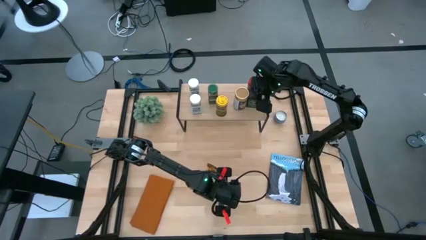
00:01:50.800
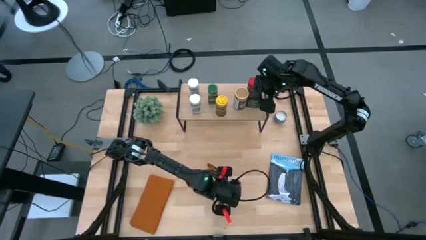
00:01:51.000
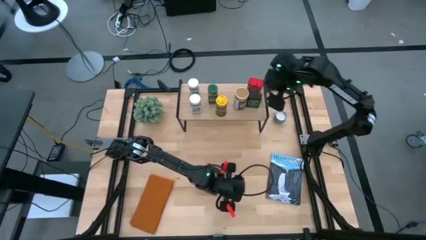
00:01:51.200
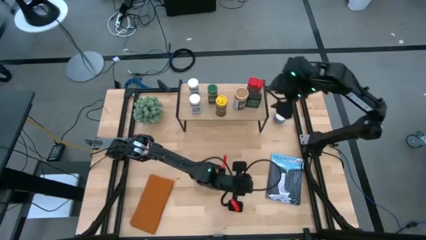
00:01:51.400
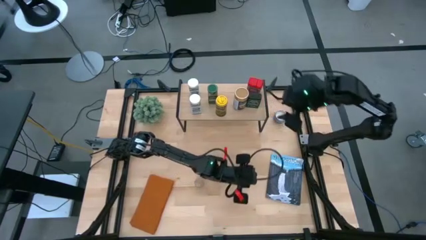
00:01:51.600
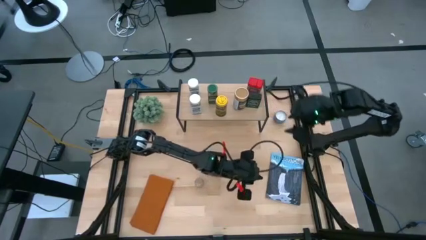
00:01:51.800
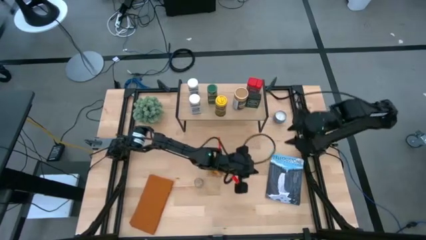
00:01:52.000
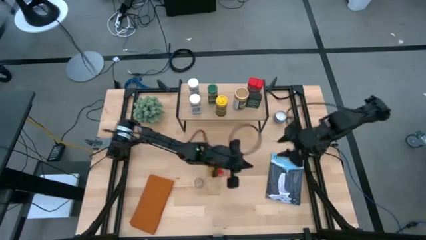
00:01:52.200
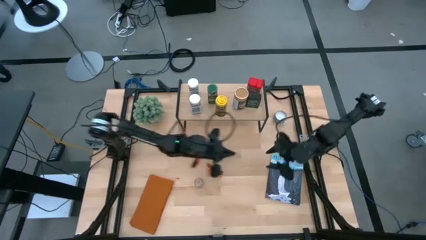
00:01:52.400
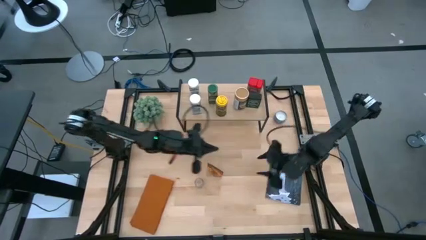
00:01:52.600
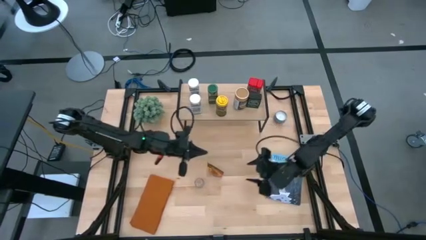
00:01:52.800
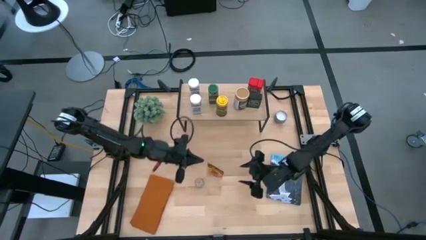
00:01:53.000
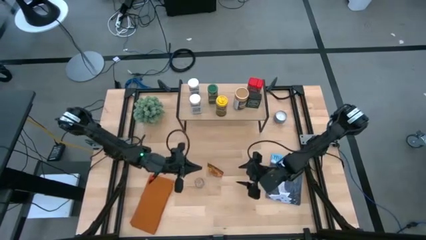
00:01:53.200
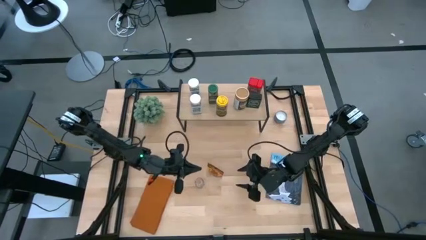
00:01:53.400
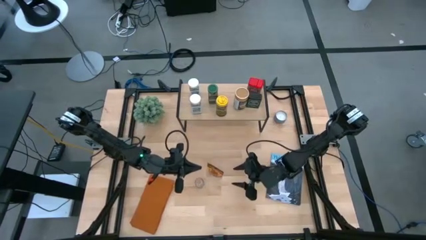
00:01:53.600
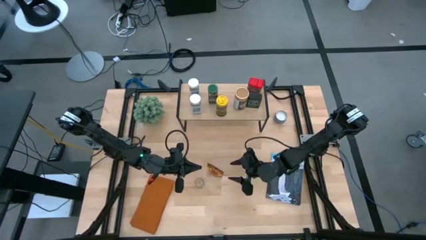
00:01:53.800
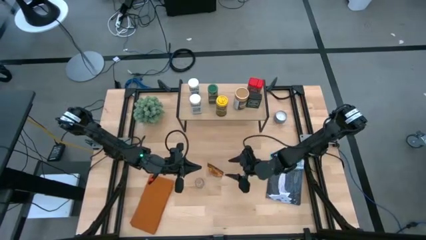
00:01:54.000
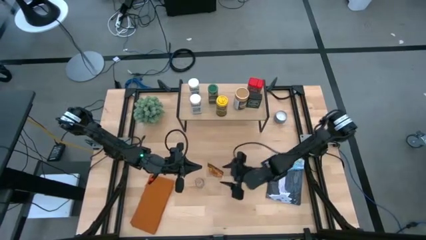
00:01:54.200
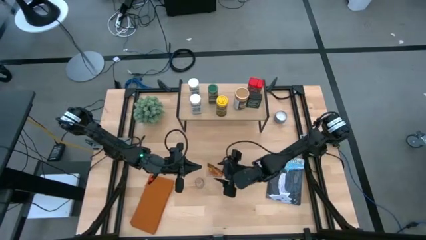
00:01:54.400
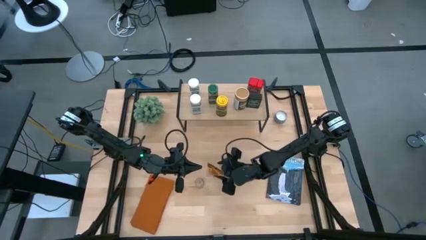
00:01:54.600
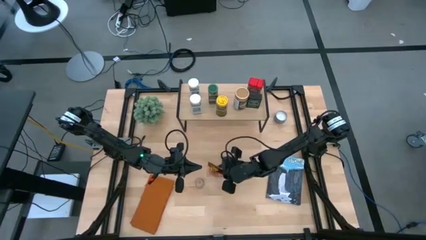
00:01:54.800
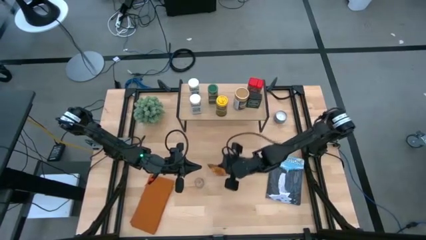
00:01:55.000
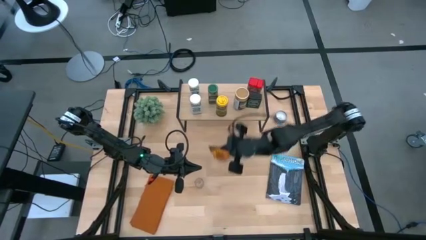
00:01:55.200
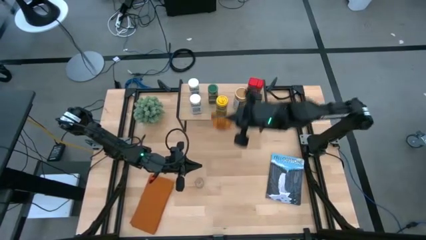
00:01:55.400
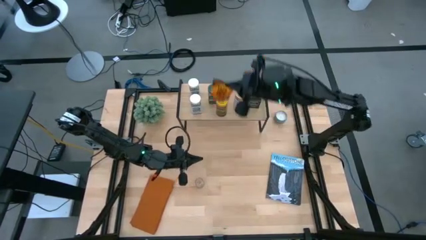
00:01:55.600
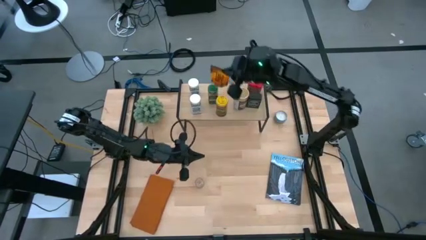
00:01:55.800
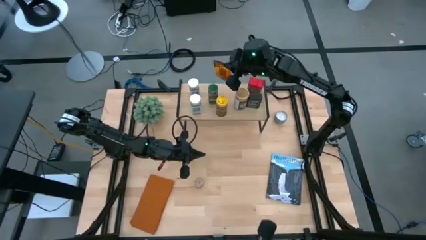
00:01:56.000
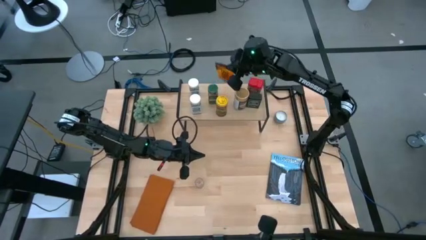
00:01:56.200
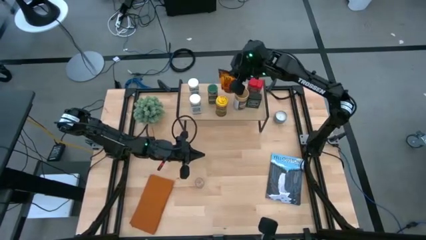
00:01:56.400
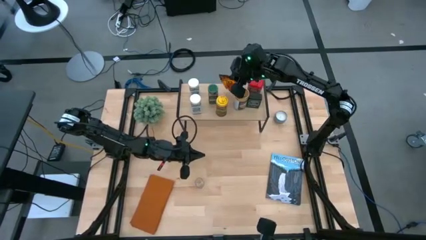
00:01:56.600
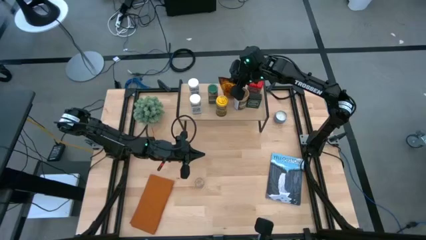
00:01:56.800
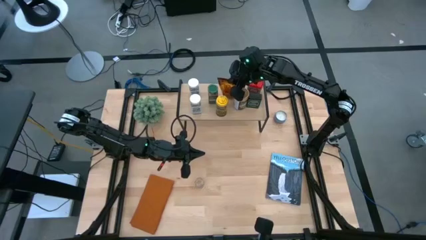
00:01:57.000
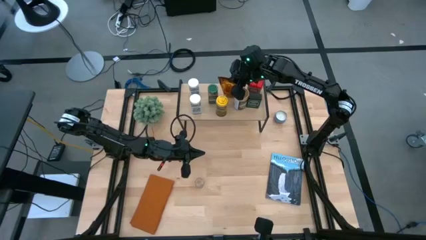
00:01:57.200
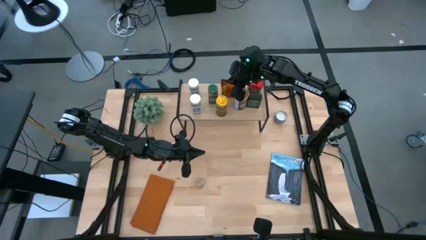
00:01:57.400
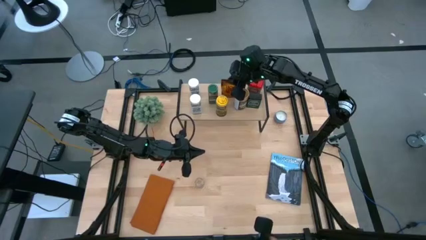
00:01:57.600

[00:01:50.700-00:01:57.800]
Task: Shelf spices
Put the orange seasoning bag on the shelf

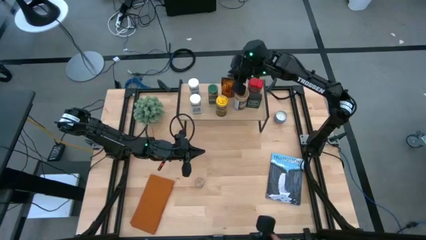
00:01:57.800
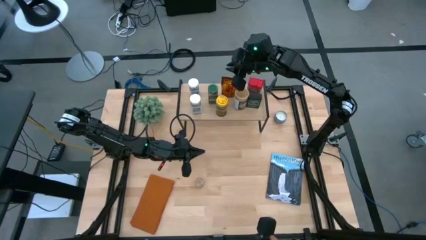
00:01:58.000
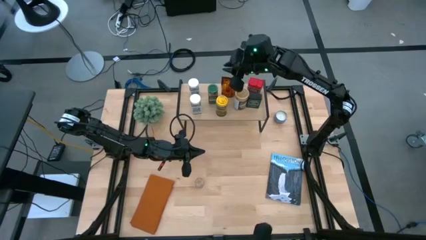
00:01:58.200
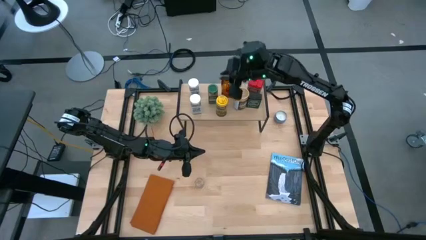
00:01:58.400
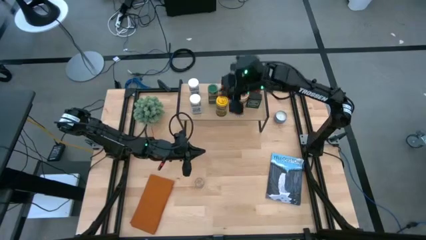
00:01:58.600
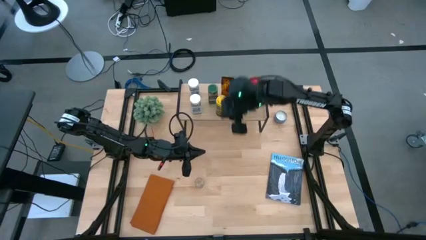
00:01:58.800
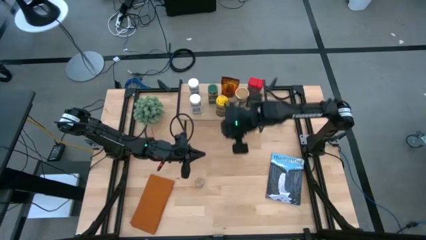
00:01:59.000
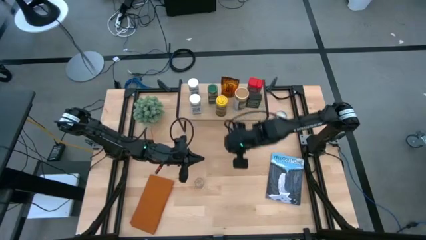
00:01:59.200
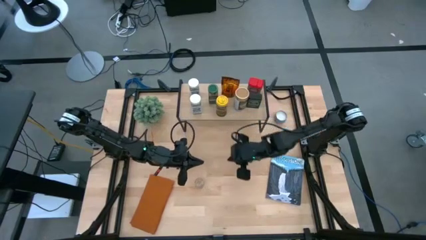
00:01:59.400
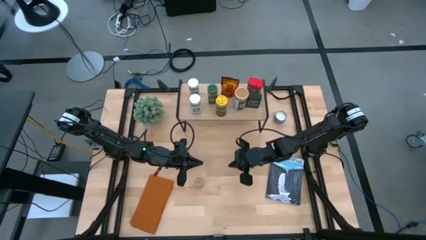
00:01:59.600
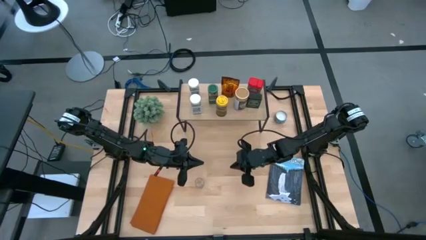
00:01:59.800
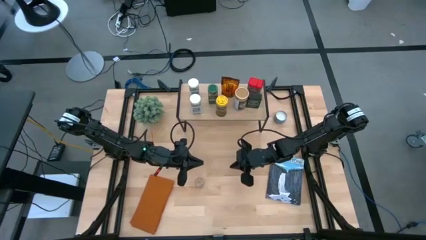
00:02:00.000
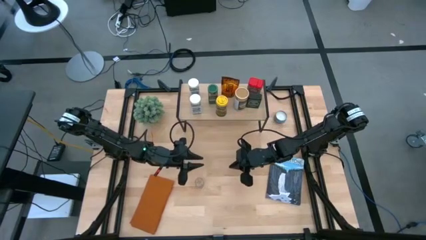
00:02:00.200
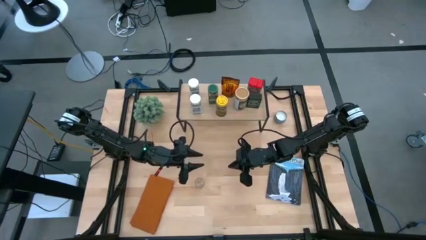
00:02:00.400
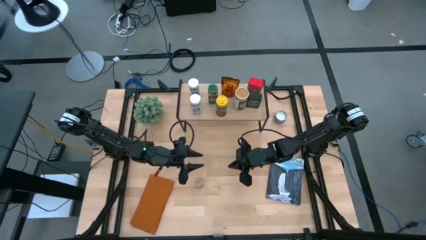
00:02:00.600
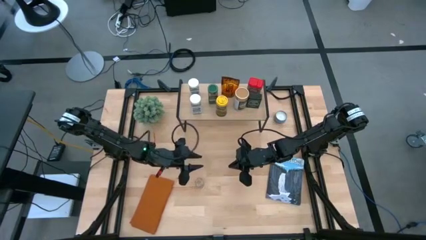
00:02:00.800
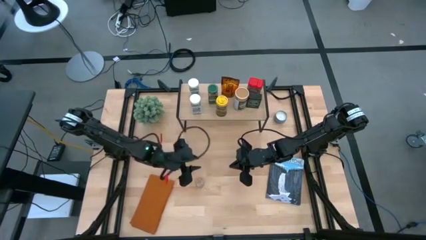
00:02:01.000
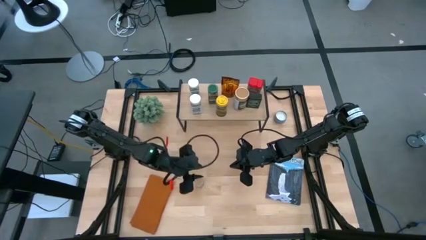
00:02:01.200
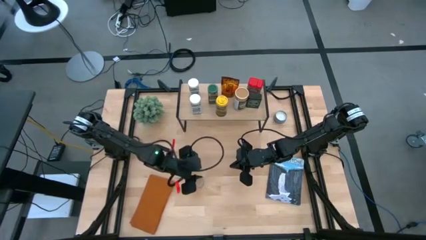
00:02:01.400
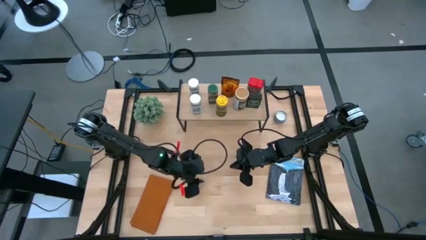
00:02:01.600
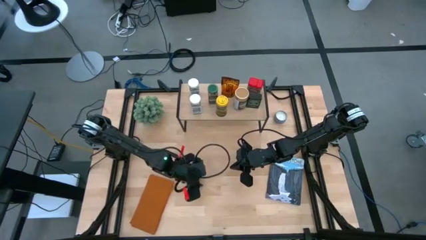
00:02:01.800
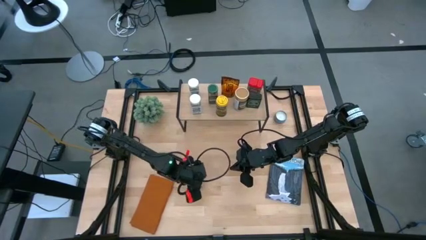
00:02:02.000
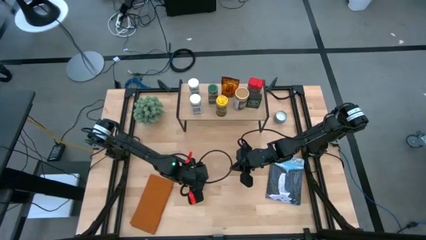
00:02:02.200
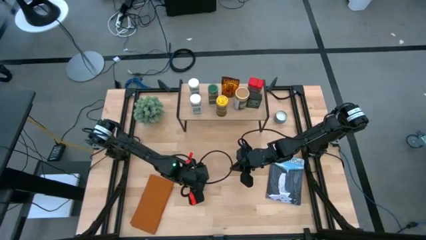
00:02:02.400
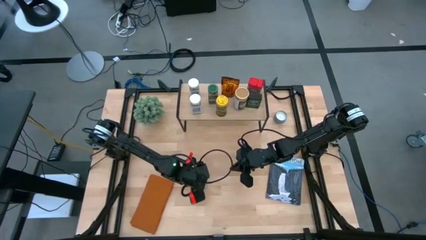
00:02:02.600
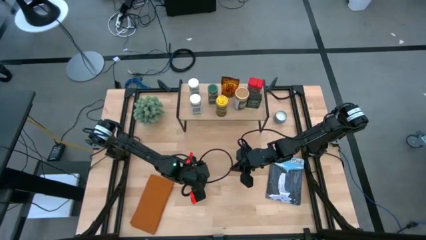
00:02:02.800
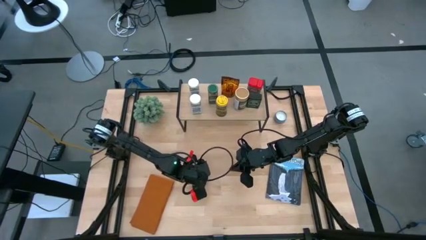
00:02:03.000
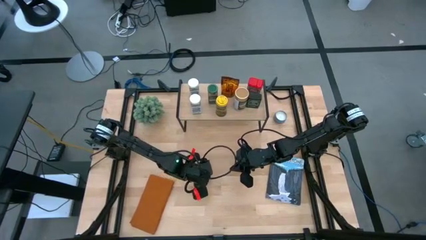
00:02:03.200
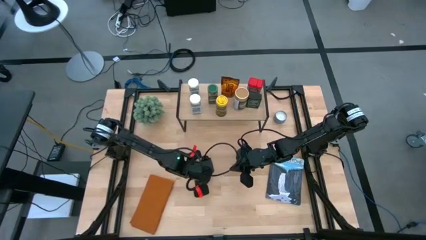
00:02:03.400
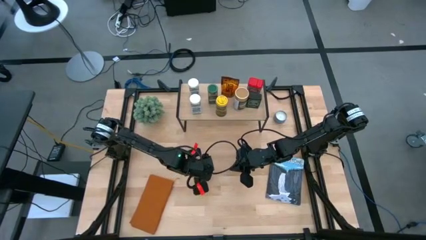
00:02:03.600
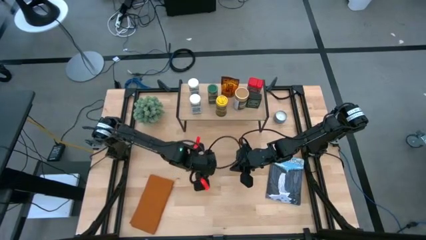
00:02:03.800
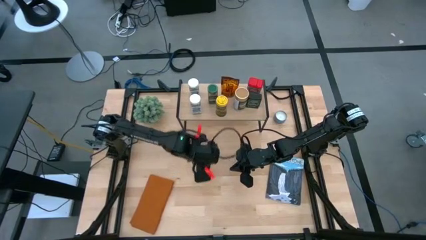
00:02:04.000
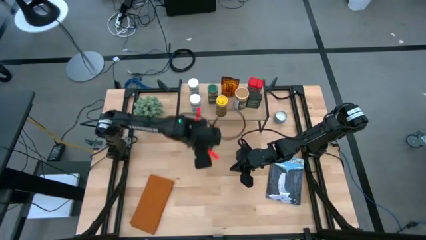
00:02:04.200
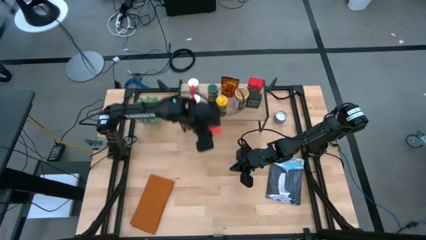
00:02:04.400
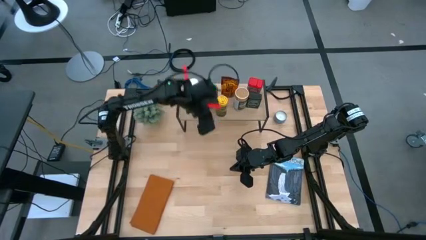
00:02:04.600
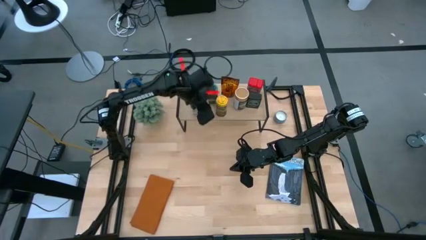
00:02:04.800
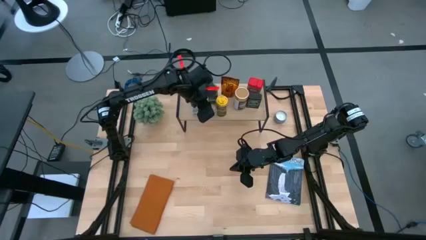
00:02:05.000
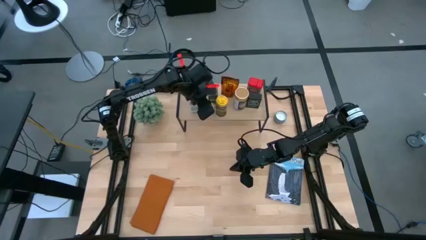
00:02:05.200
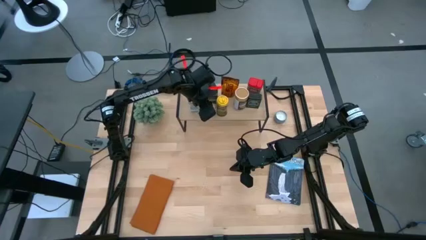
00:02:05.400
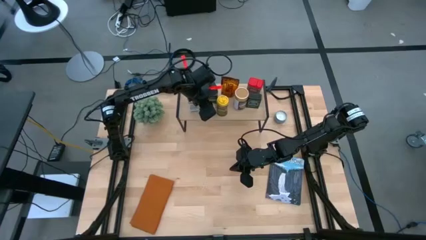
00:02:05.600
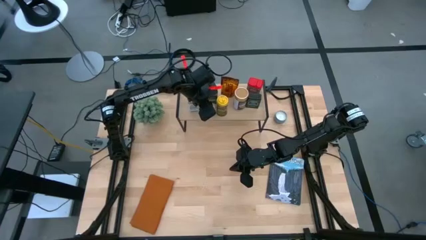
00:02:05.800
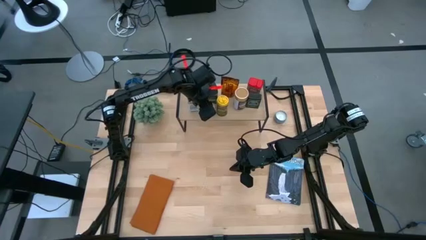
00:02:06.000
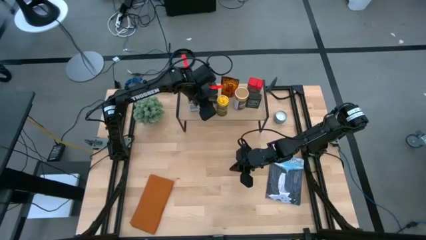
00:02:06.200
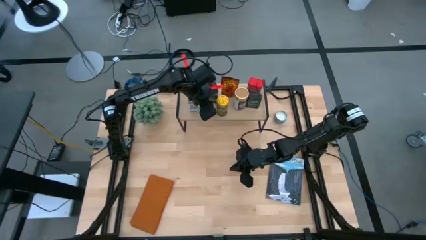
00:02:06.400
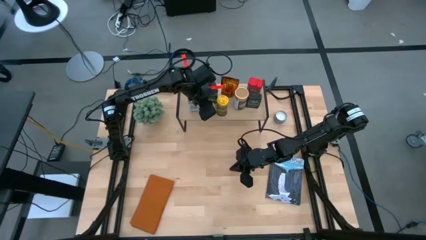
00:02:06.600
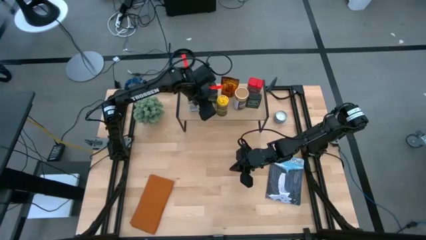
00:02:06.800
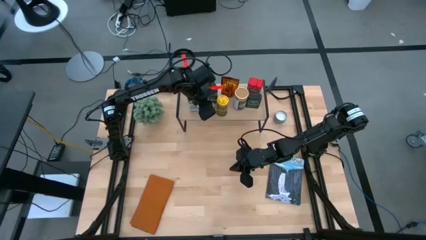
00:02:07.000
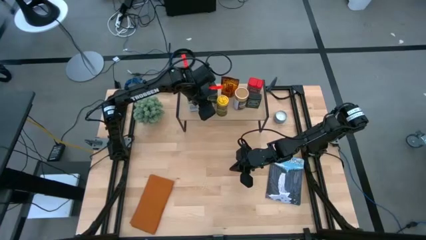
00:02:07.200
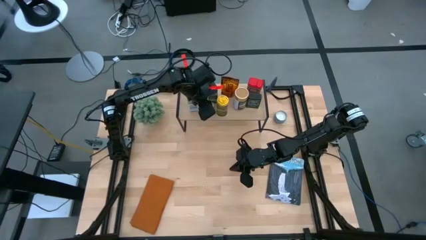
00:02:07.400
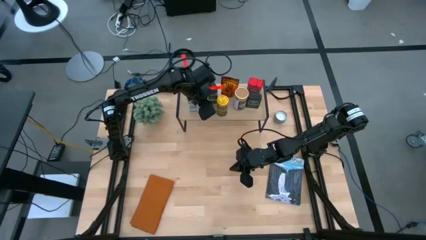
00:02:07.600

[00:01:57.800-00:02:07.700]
Put the brown seasoning bottle on the shelf
